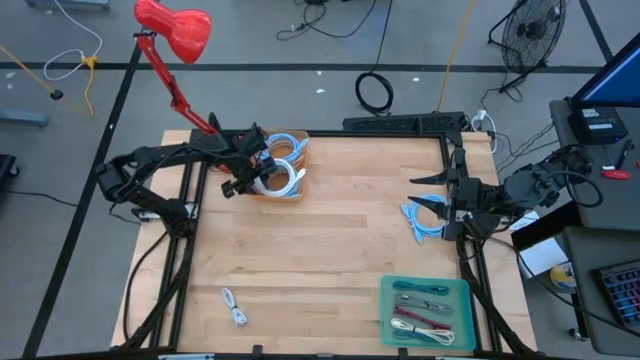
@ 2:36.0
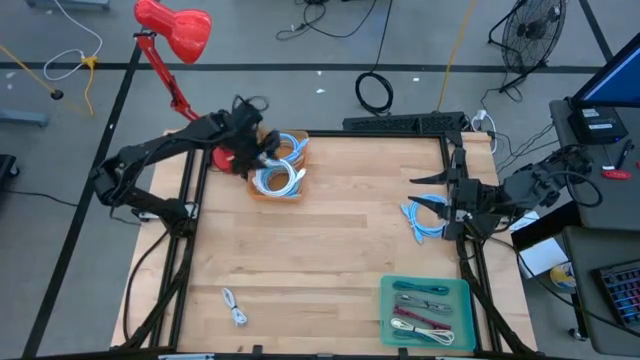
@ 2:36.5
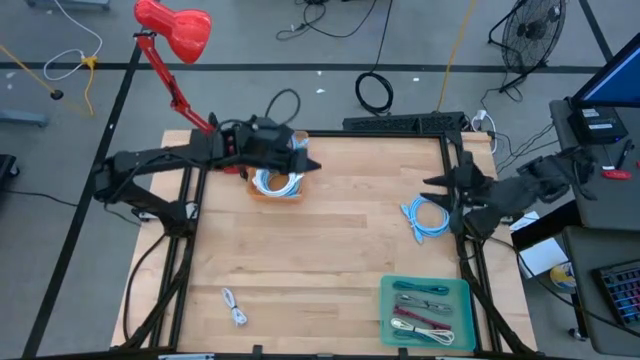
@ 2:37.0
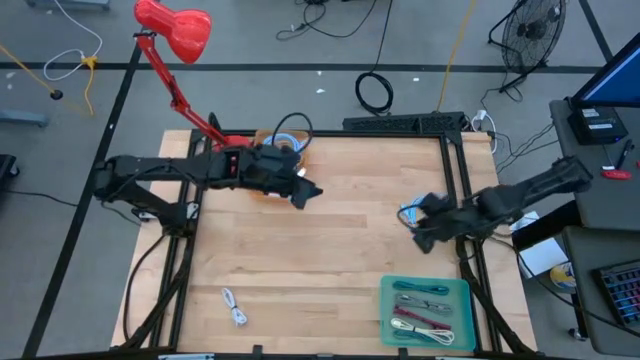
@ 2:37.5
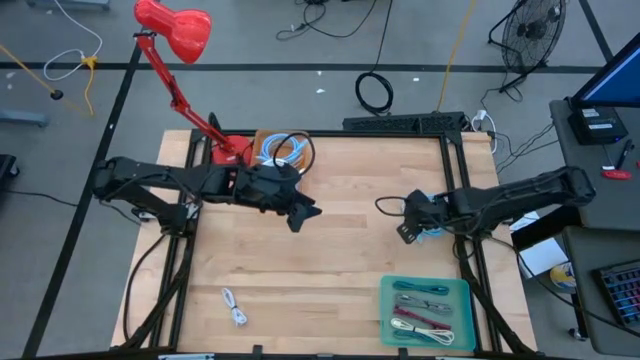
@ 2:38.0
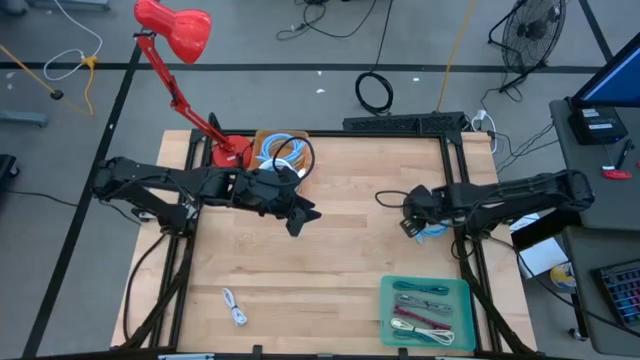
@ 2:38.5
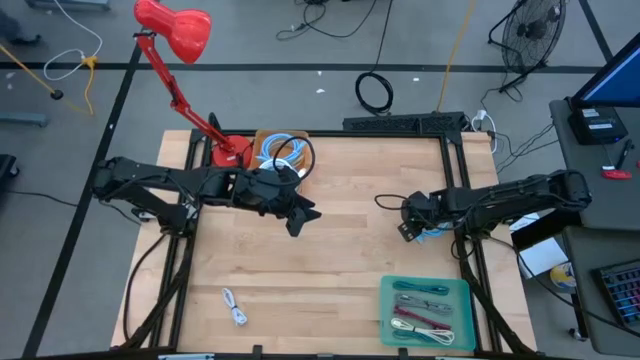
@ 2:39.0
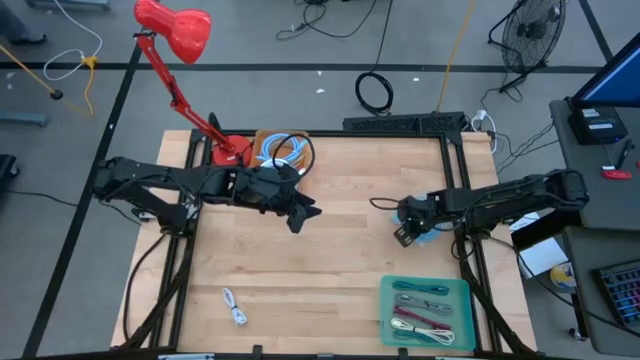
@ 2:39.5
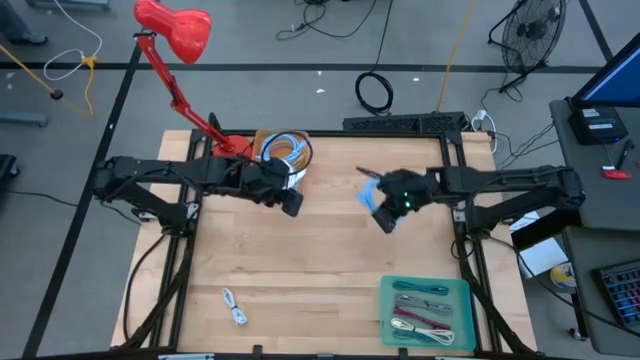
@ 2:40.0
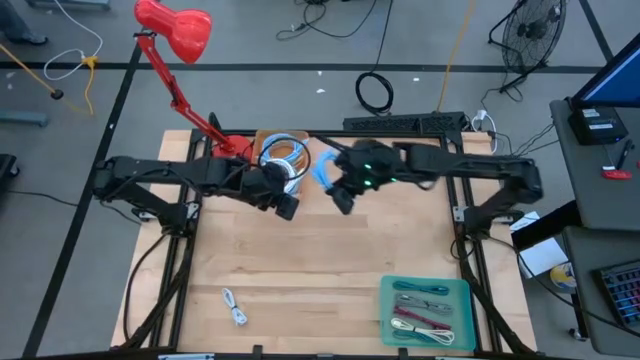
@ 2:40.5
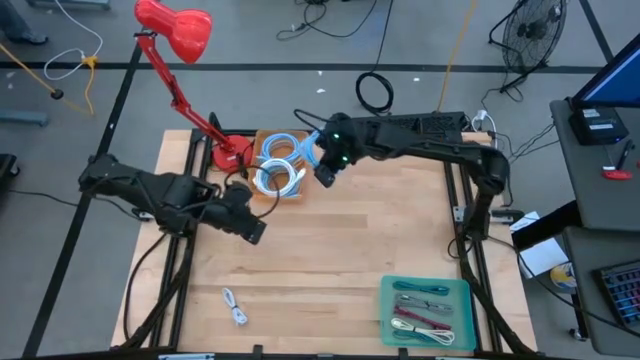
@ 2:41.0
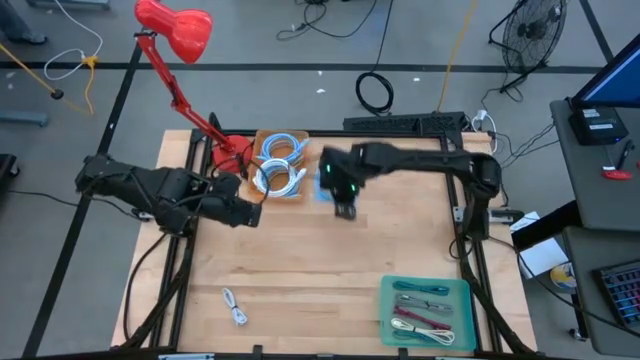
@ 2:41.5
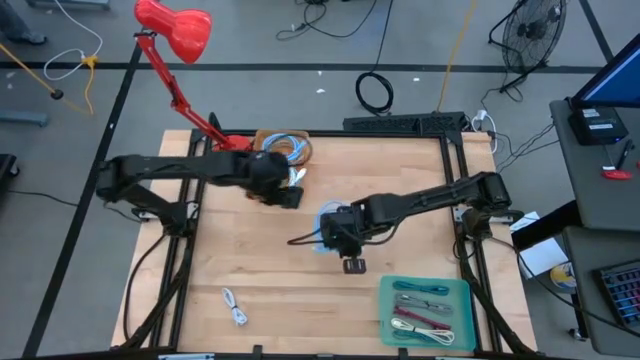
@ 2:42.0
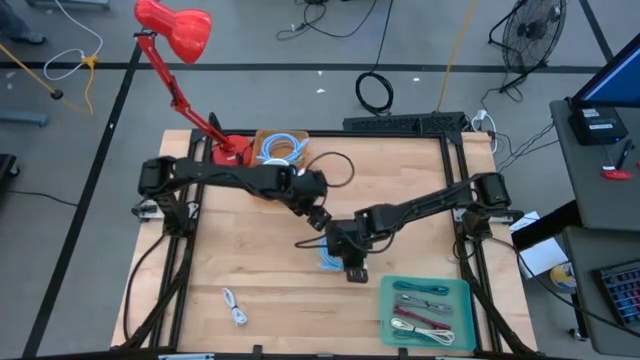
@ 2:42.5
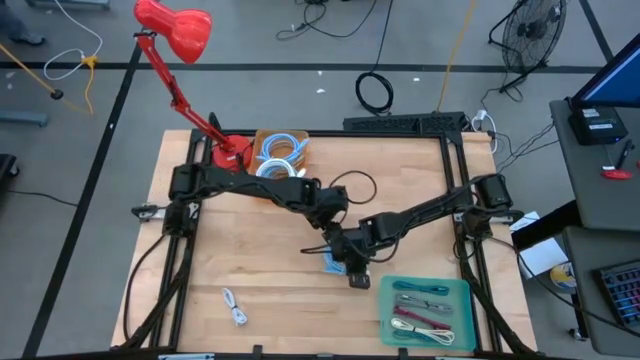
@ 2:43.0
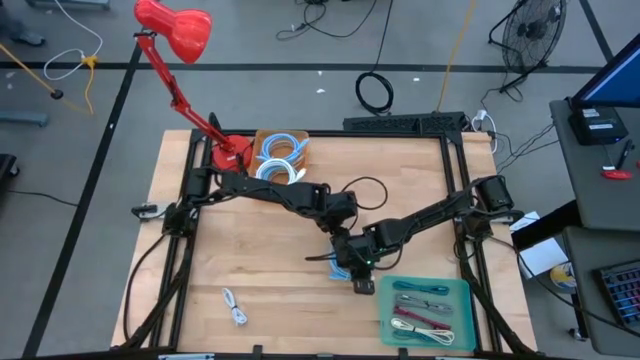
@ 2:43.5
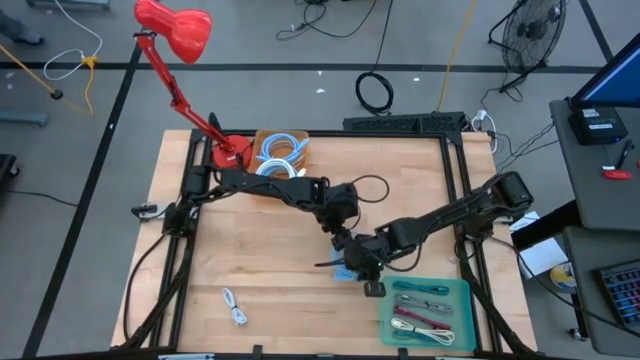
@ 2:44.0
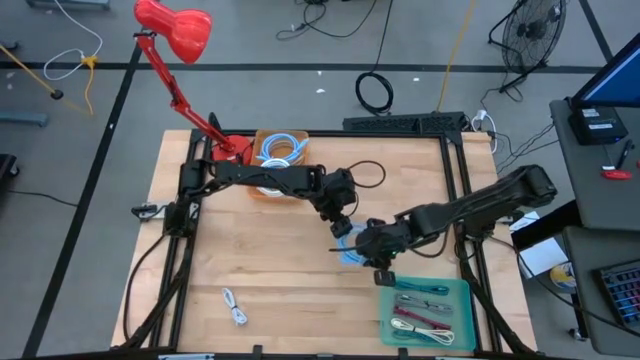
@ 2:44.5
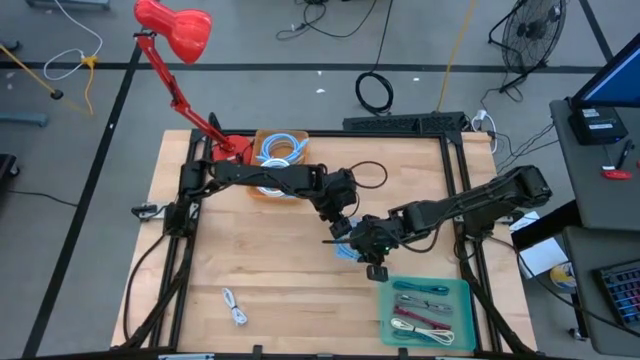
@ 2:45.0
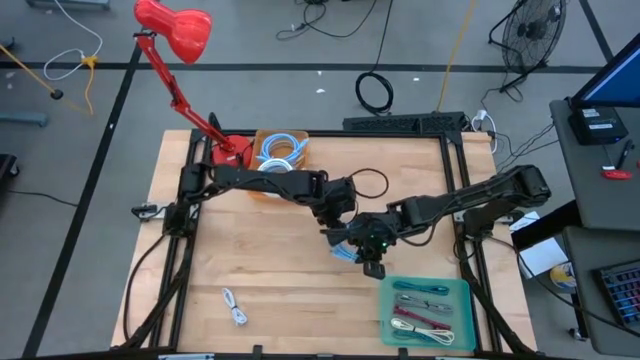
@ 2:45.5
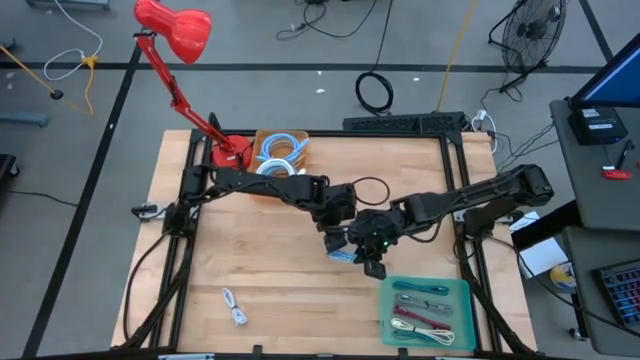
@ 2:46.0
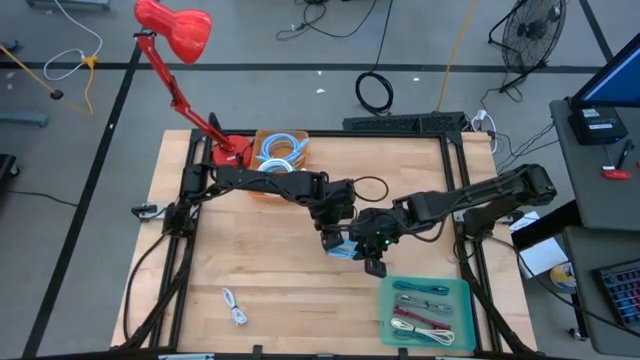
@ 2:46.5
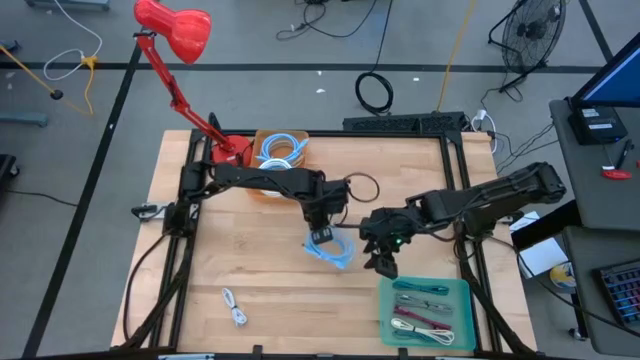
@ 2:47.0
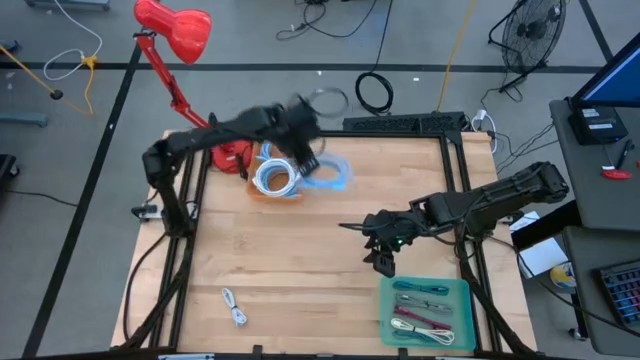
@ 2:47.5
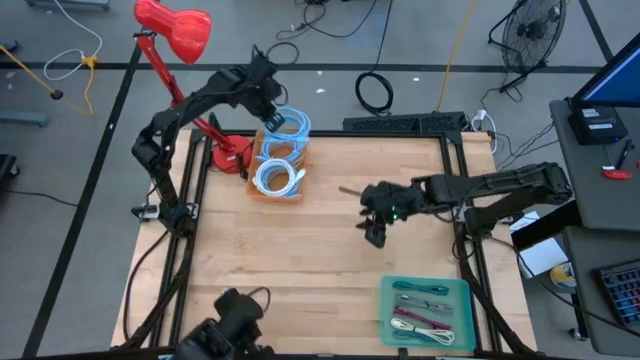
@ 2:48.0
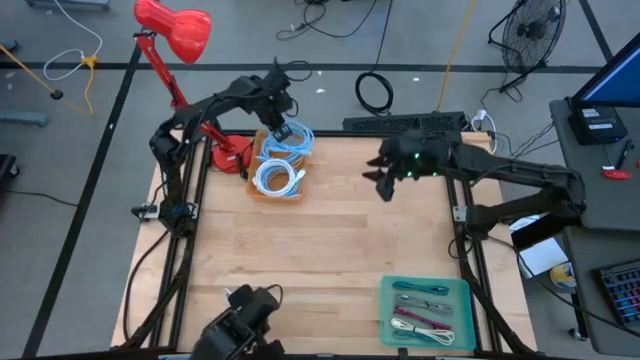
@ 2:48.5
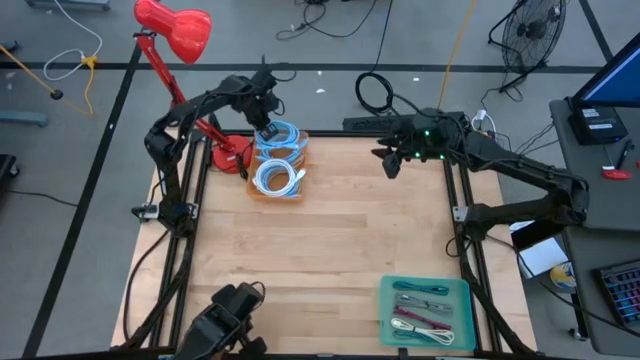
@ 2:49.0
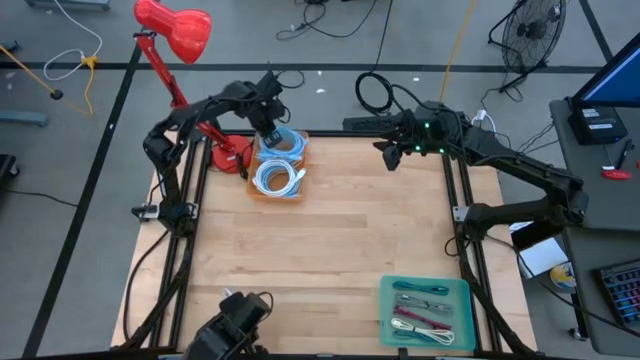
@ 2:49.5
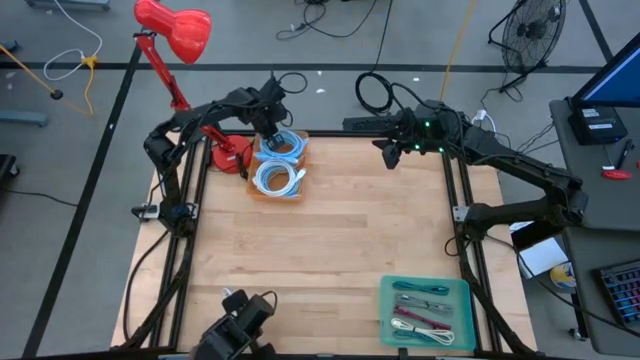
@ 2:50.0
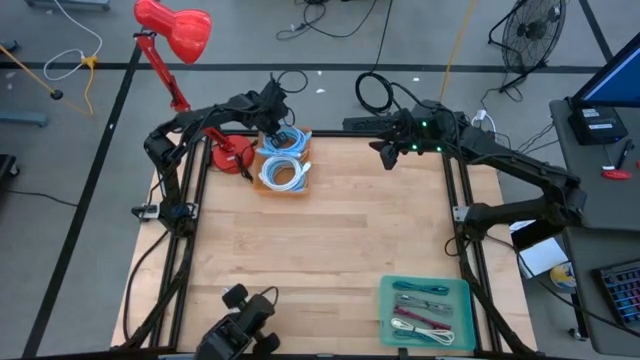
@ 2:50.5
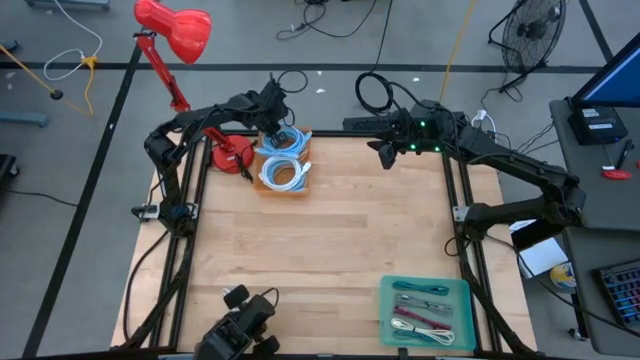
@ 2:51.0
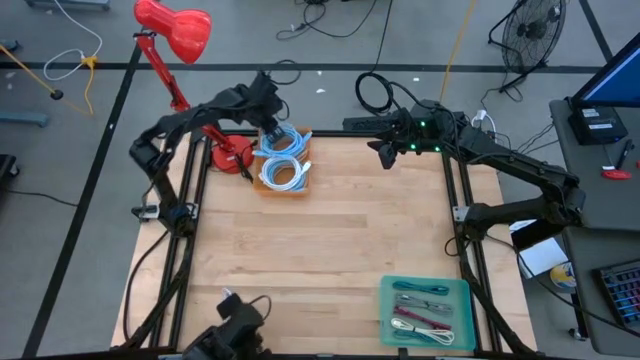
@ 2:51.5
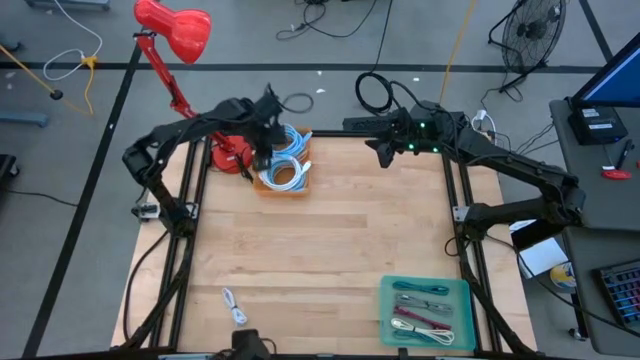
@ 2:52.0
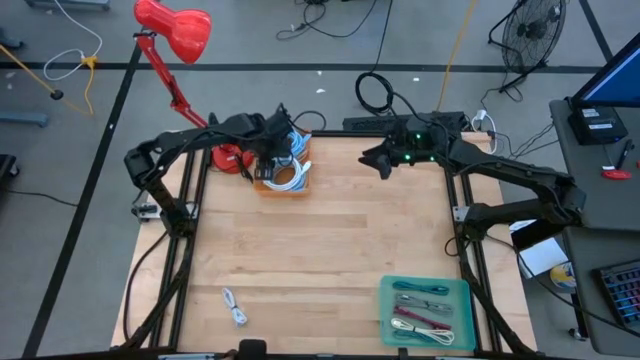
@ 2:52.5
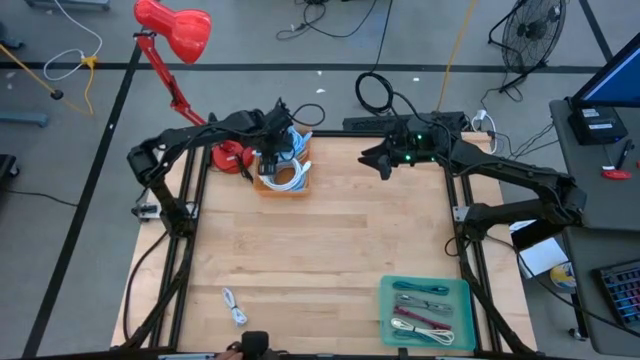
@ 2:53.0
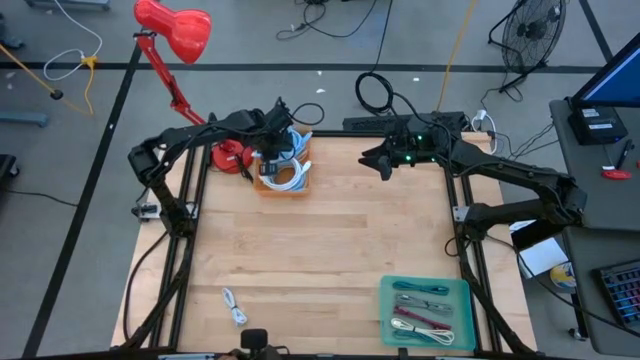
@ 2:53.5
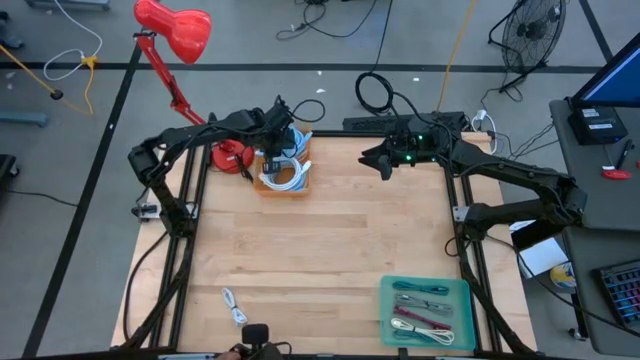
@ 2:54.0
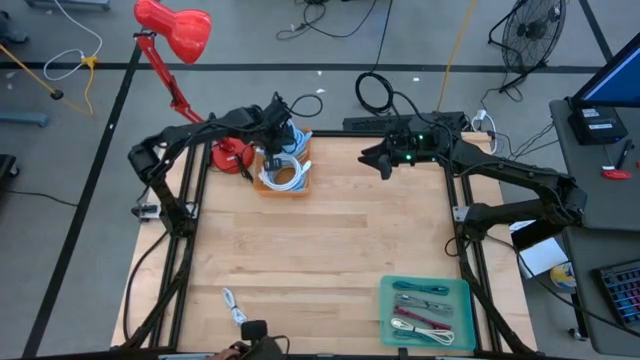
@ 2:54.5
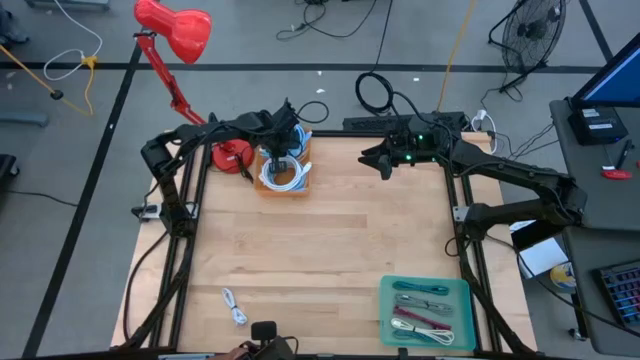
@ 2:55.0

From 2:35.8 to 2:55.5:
Task: Pick & Place USB Port
Put the light blue wire cable into the orange bin

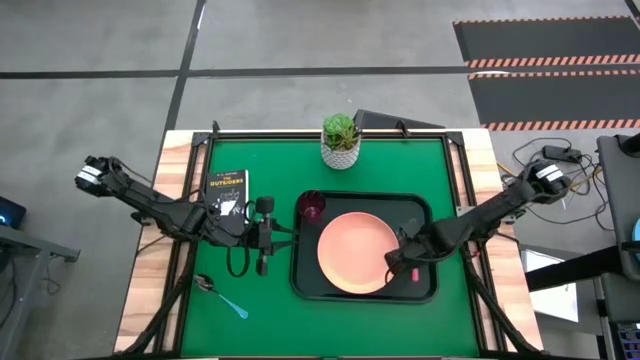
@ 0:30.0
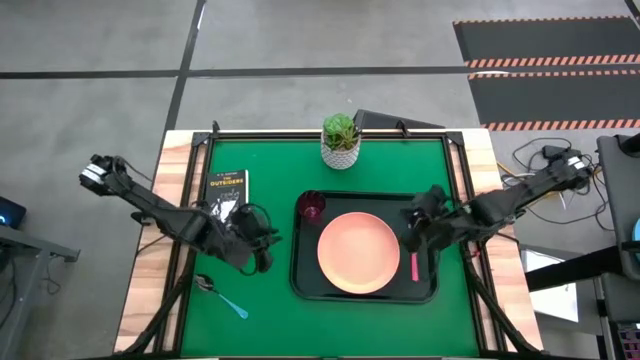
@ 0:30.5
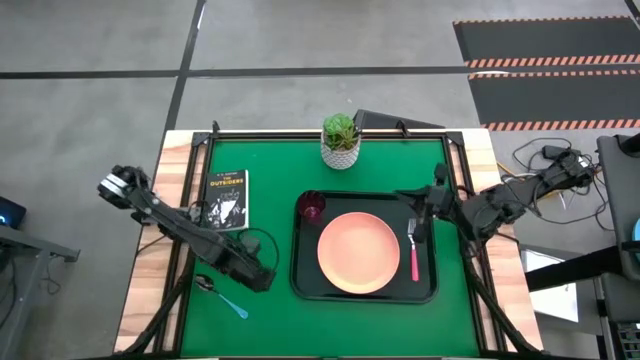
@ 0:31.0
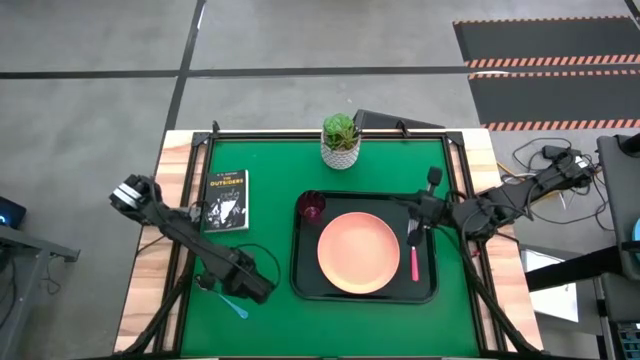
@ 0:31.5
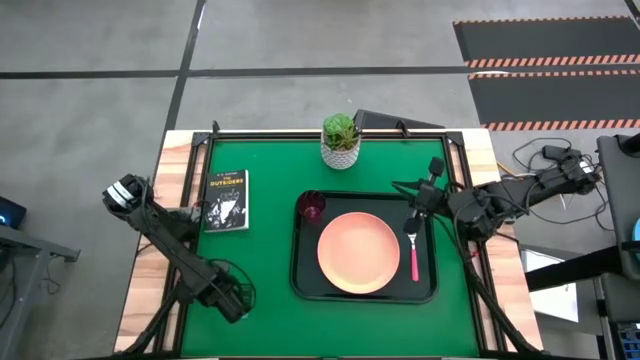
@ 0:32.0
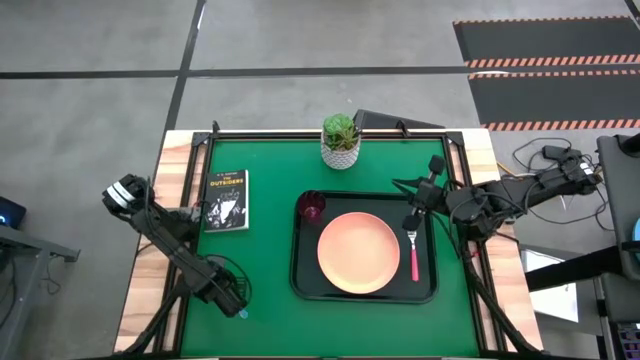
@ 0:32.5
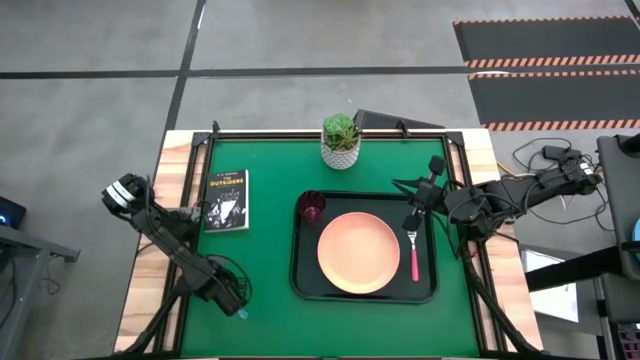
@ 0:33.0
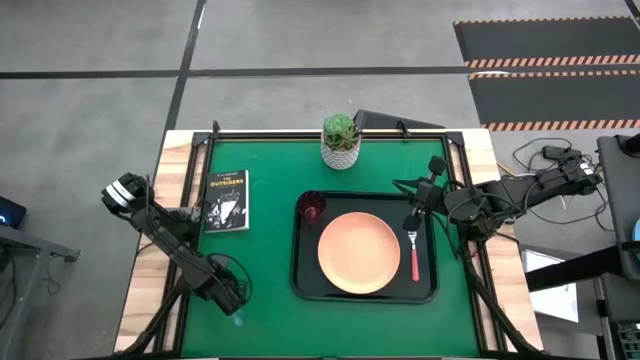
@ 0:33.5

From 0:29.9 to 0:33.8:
Task: Pick and place plate/cup/fork/spoon on tray
Put the light blue spoon on the black tray at the left of the light orange plate
